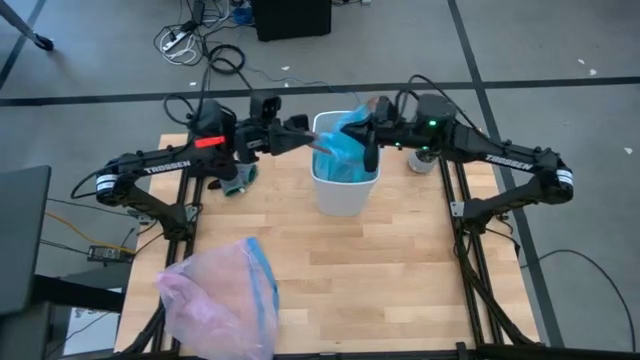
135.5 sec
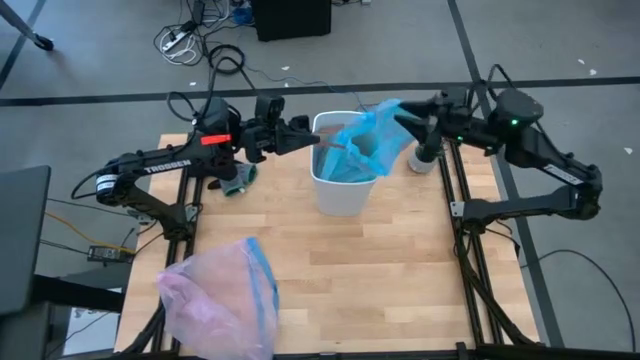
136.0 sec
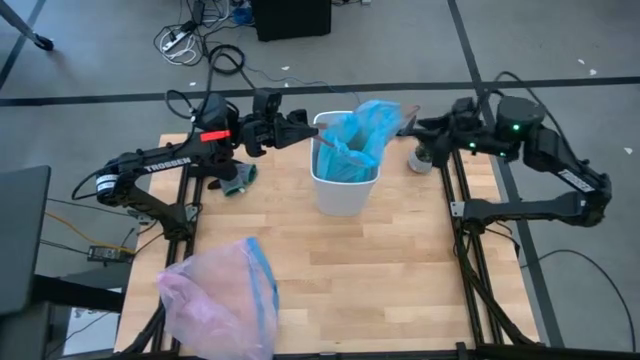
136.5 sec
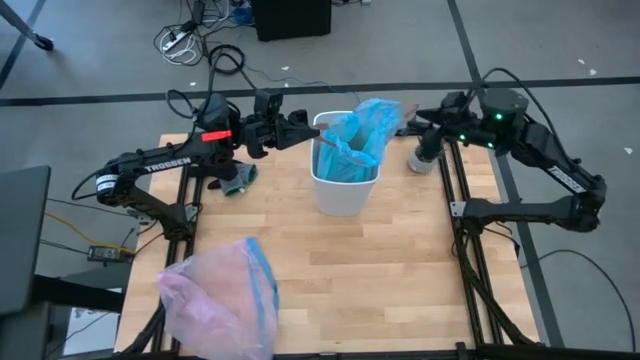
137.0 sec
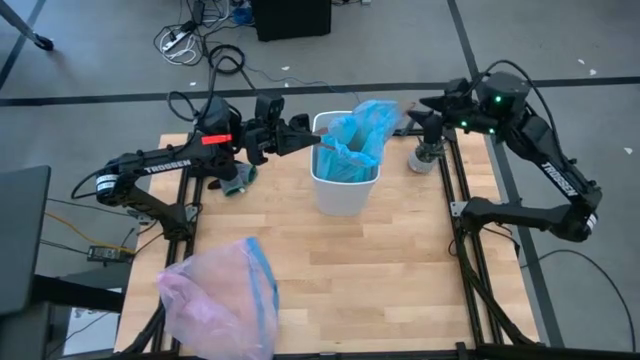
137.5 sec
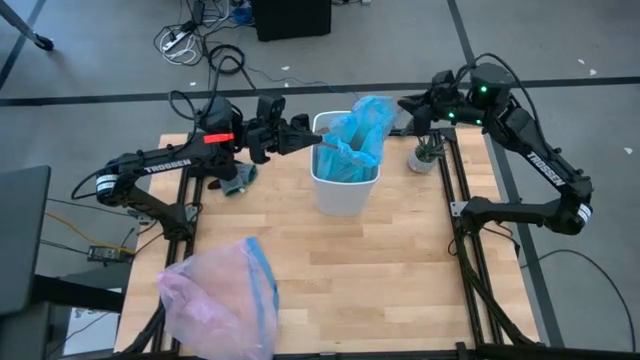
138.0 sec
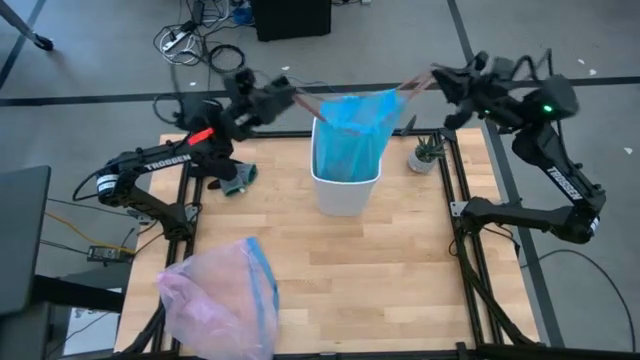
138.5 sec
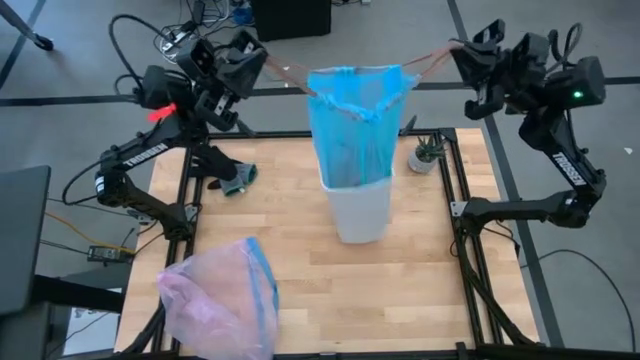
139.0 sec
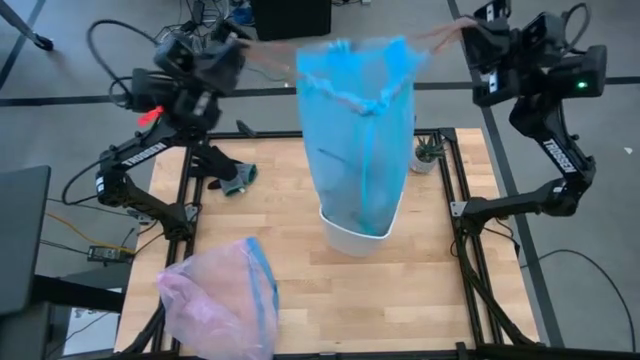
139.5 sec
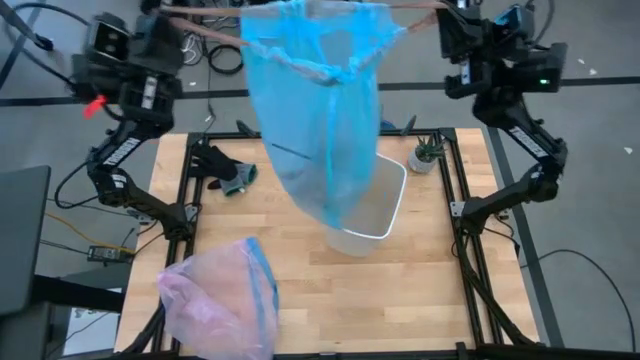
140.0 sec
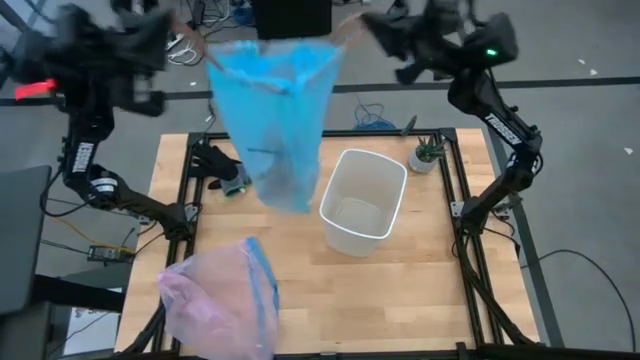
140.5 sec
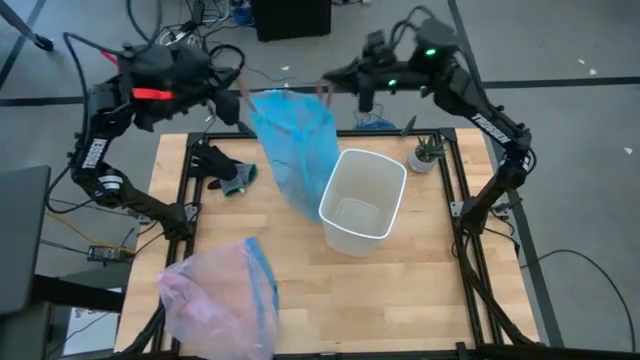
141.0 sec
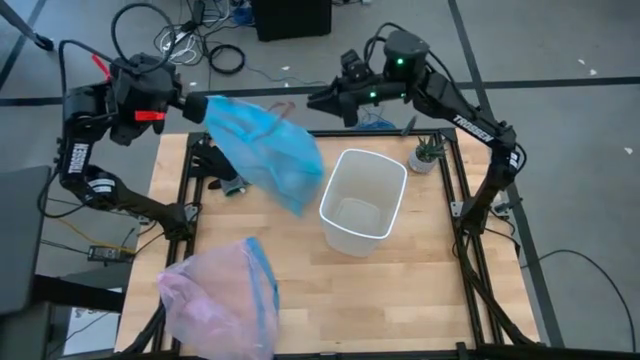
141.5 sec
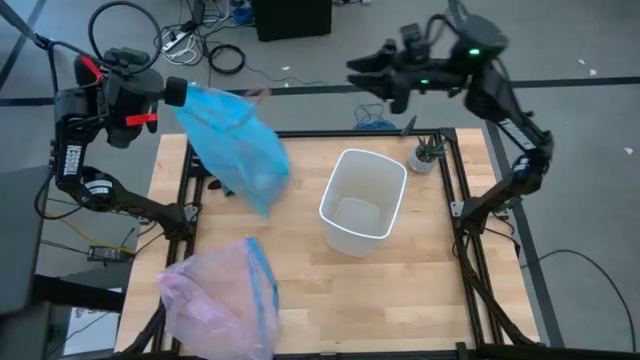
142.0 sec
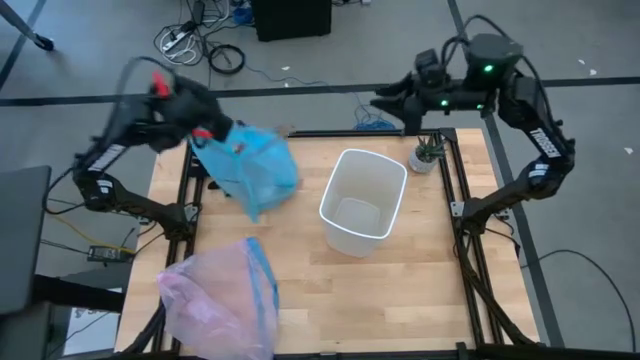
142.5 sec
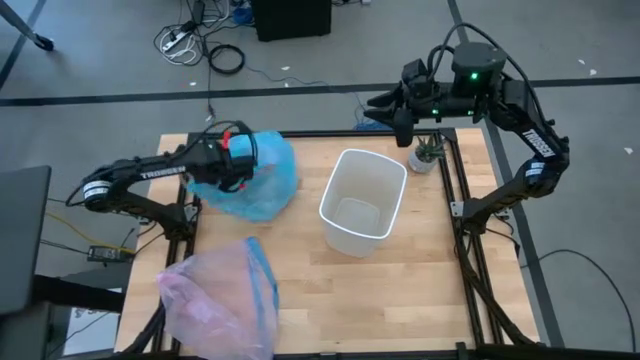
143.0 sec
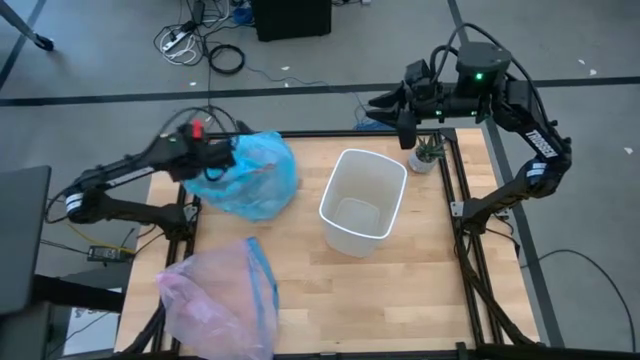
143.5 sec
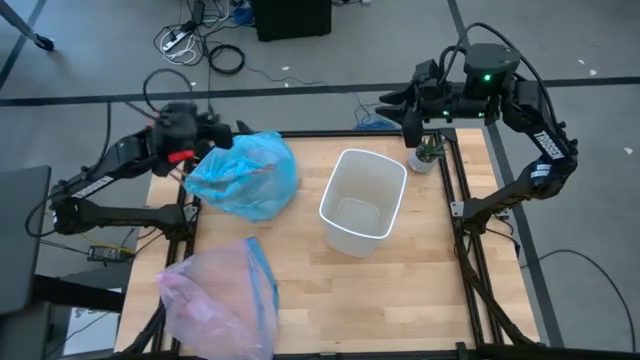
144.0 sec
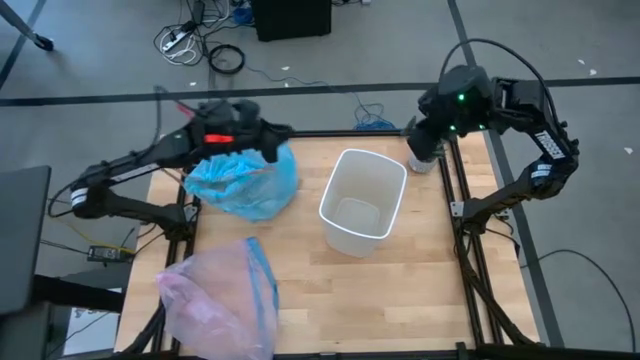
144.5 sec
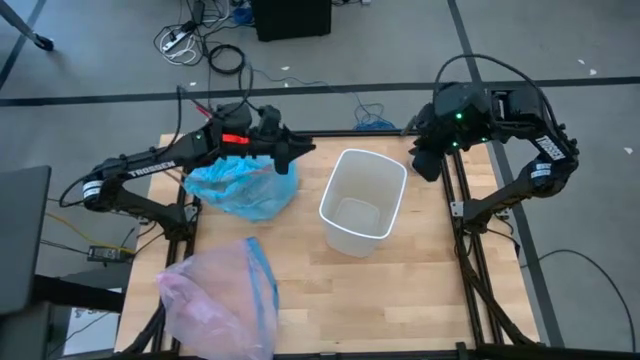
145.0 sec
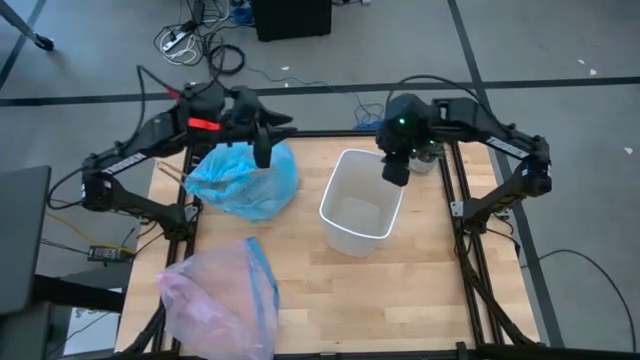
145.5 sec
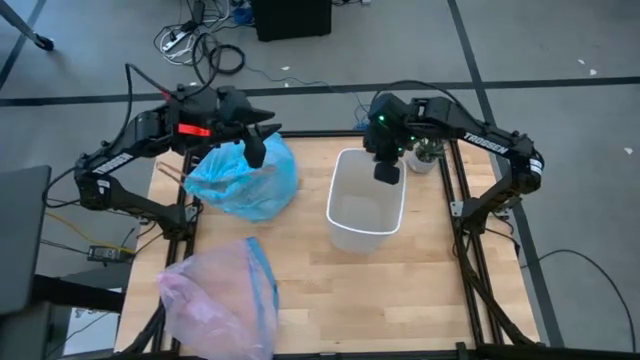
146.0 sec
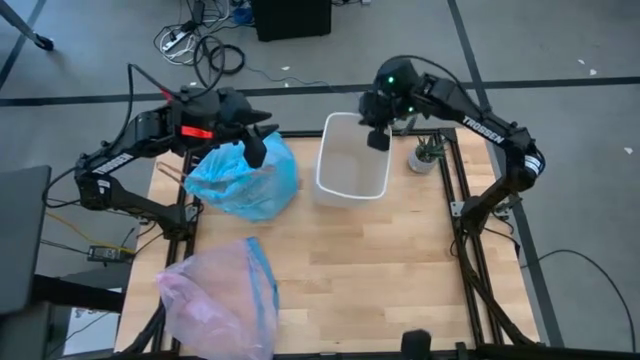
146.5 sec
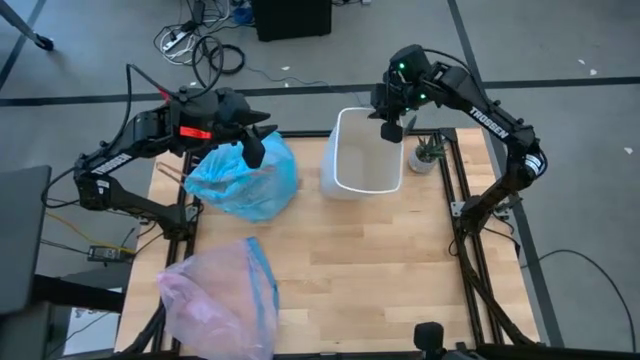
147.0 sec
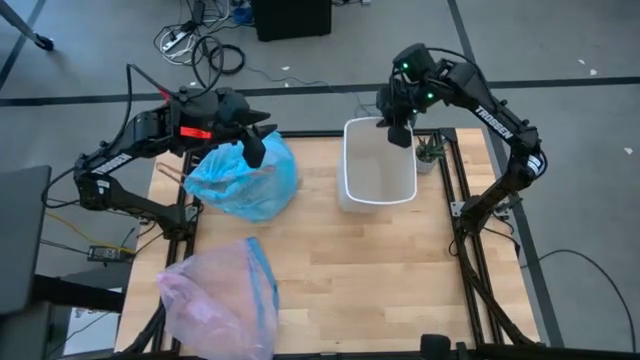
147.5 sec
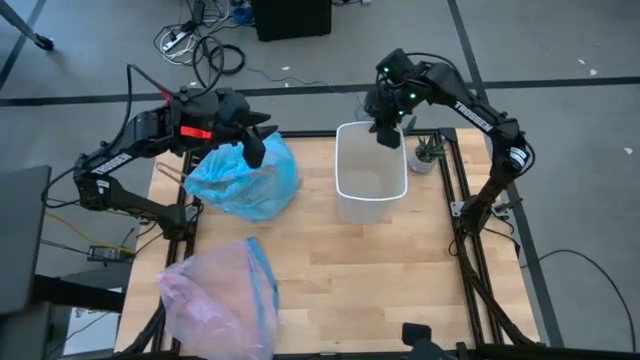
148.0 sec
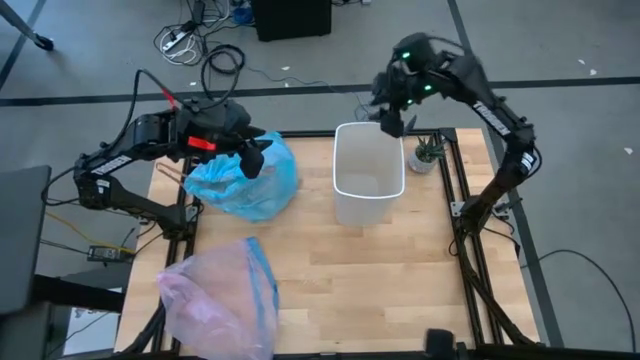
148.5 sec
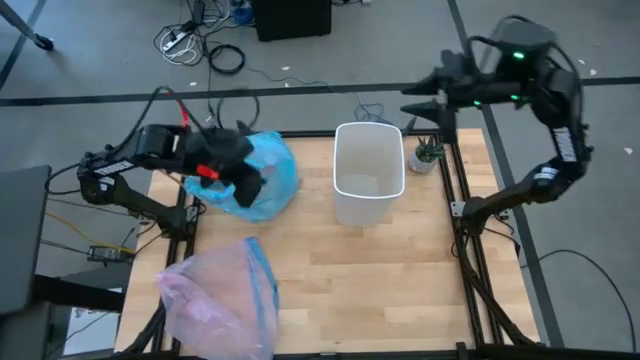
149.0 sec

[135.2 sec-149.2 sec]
Task: place trash/remove bag and relplace
Remove the trash bag from the trash bin

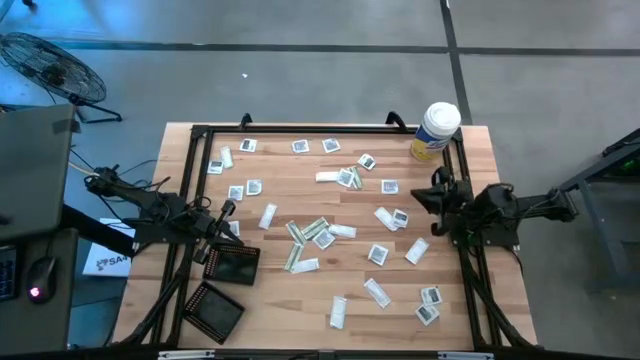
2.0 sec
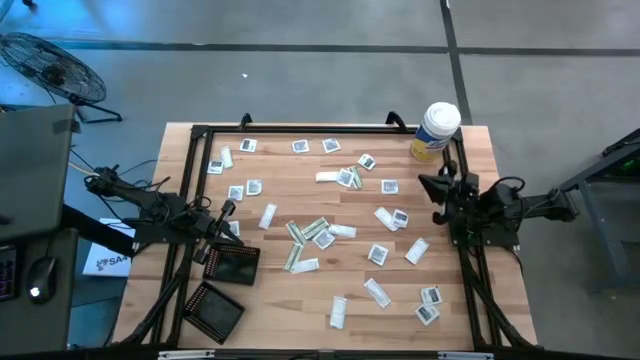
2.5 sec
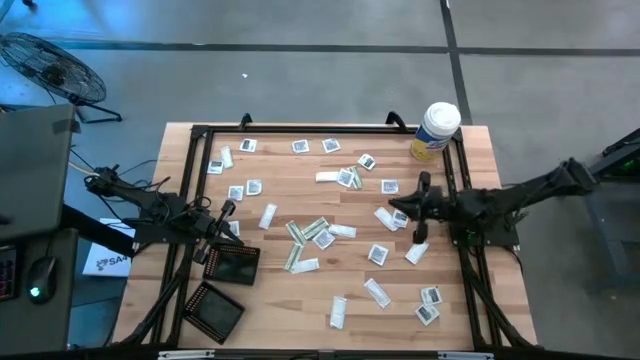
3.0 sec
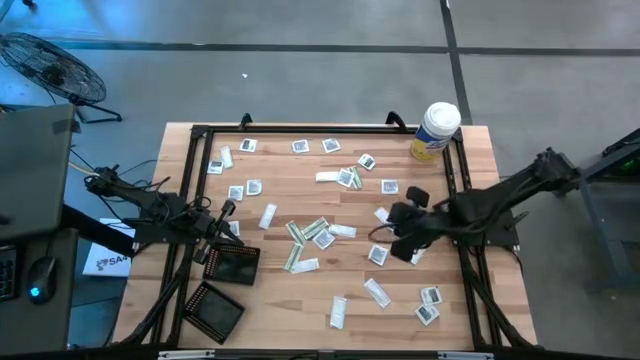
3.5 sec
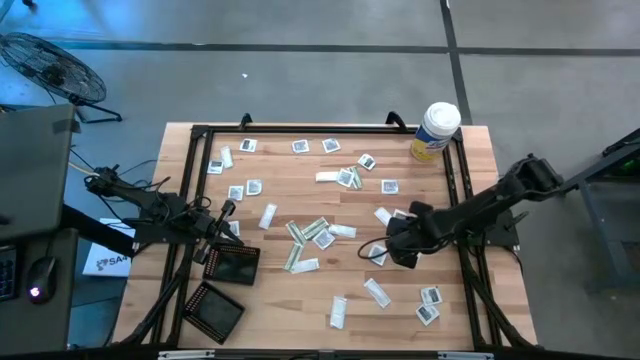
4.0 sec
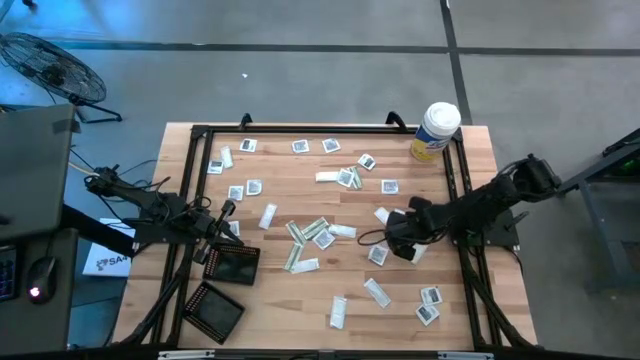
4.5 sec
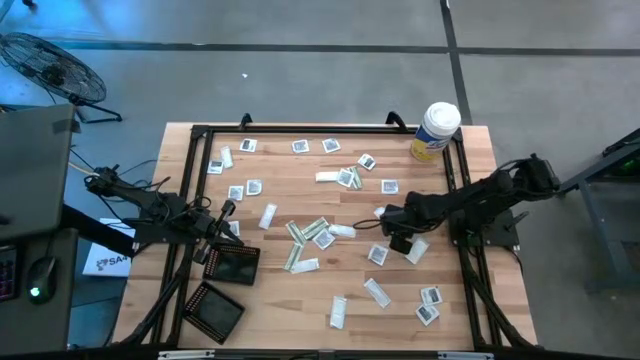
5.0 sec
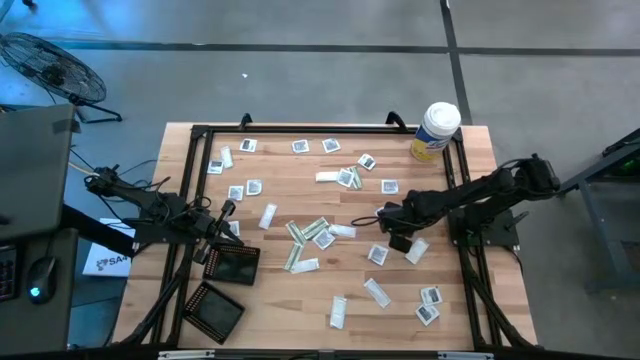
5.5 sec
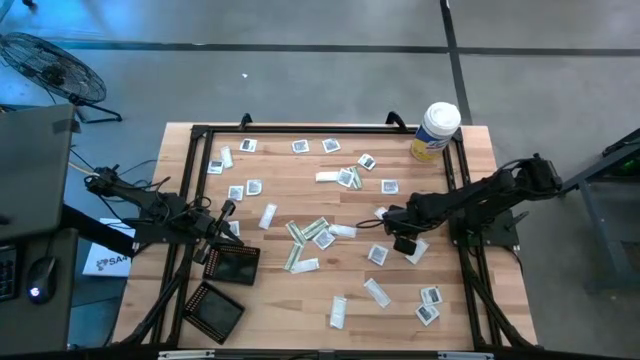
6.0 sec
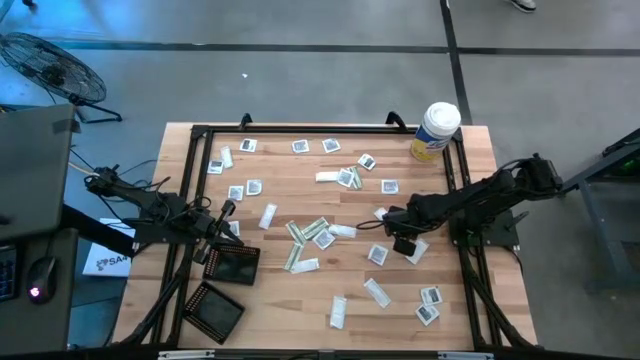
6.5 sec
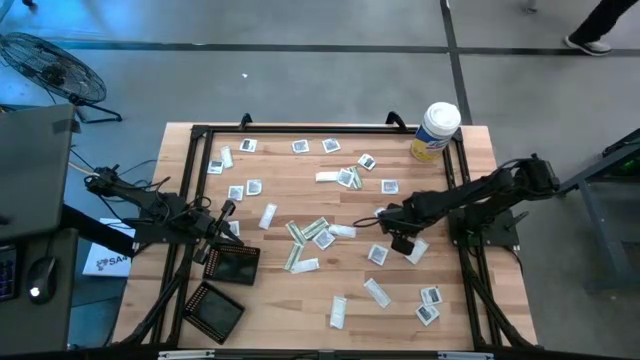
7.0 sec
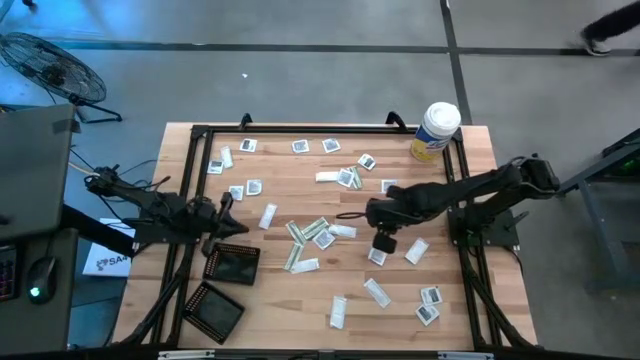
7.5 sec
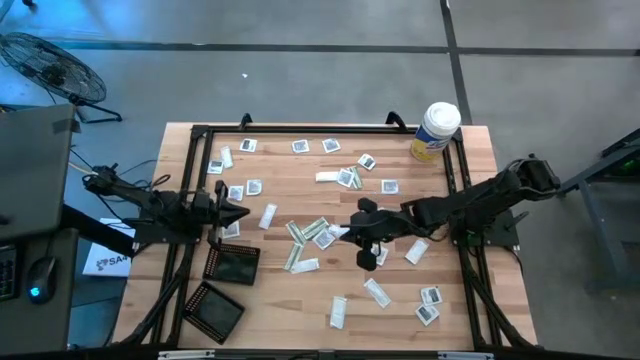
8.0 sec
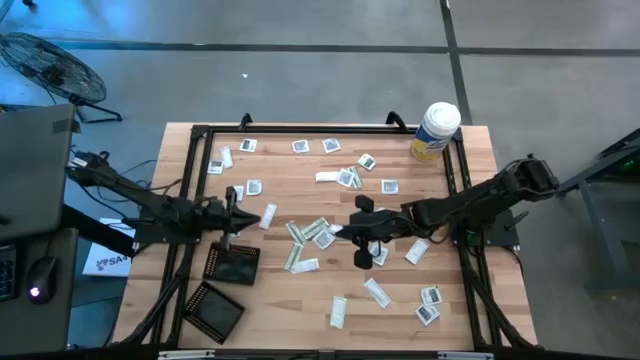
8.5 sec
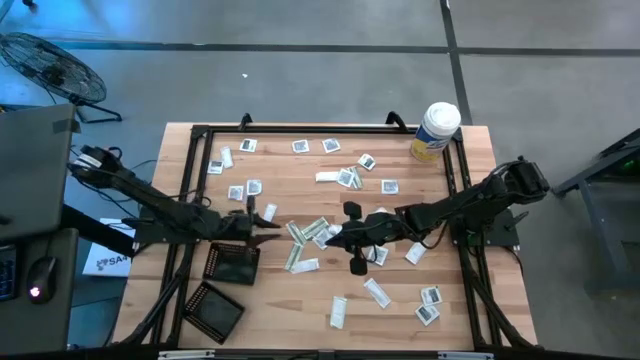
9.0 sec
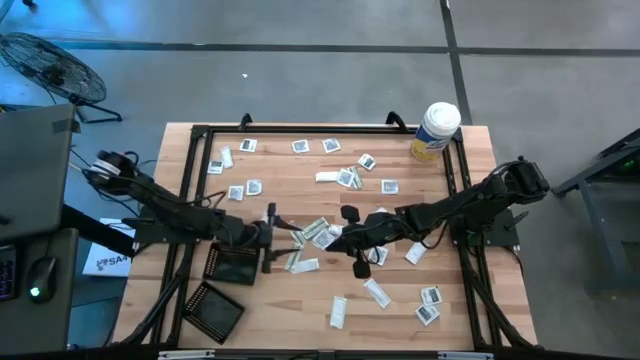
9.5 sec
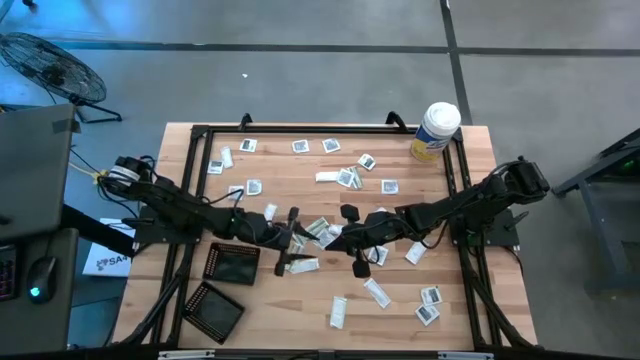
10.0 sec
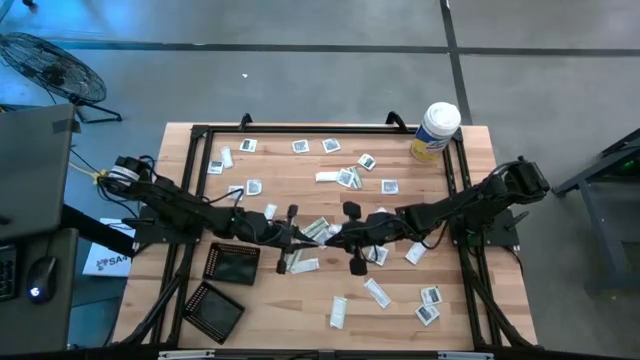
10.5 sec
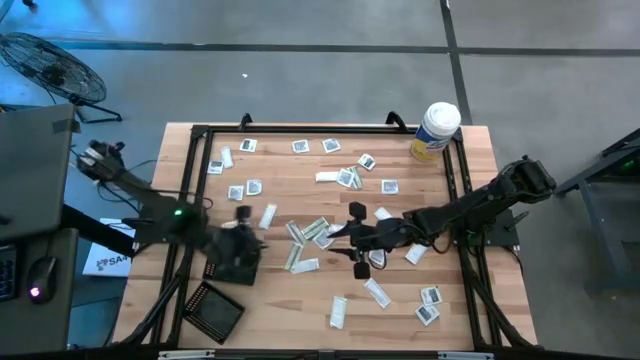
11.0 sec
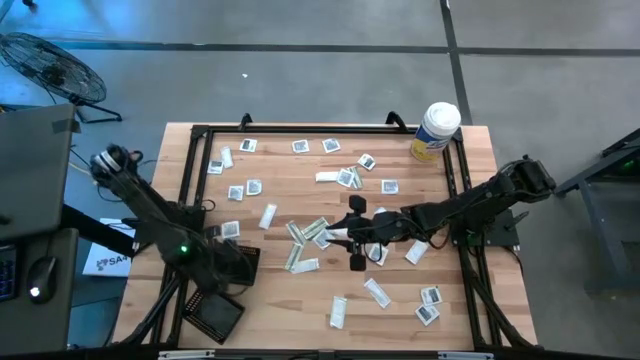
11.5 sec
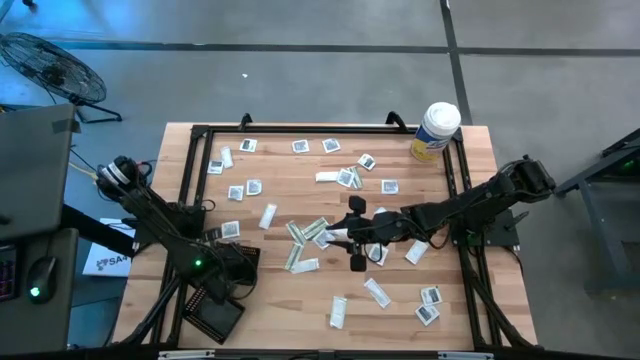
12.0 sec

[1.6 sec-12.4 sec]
Task: Pick & Place First Aid Supplies
Put the towelette pack into the top black bin
